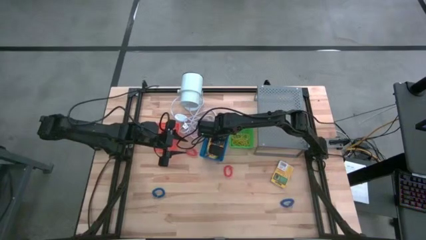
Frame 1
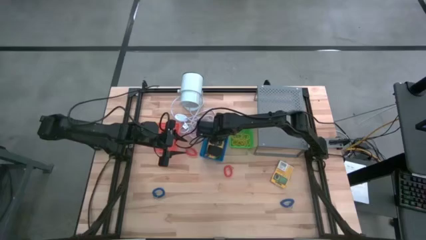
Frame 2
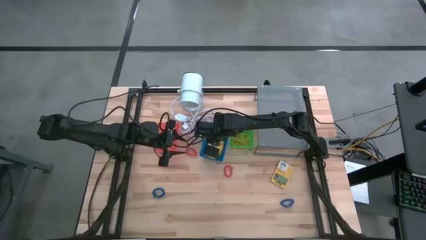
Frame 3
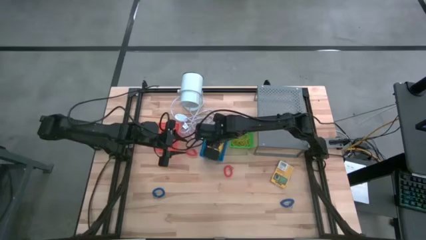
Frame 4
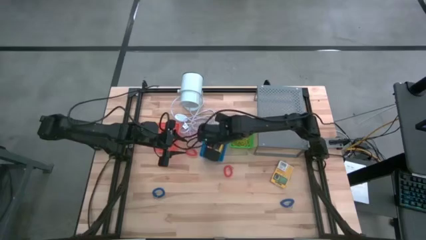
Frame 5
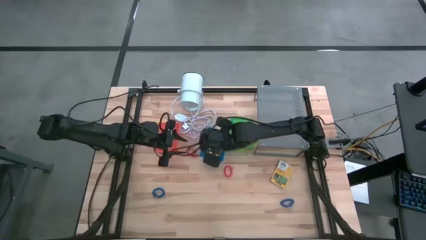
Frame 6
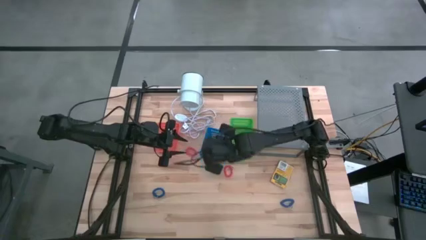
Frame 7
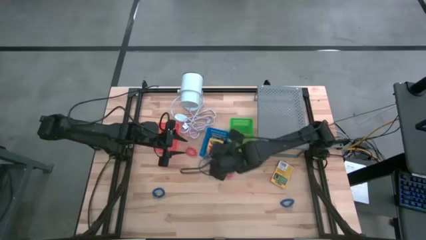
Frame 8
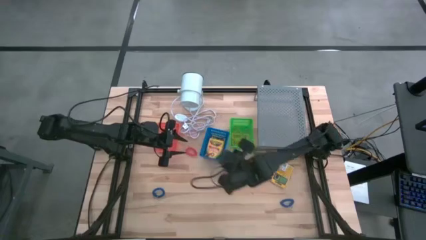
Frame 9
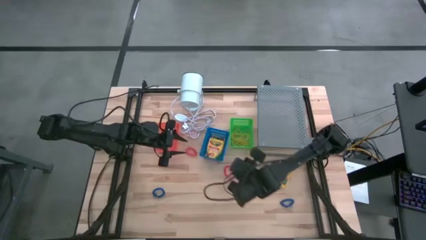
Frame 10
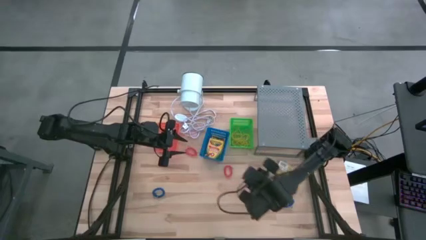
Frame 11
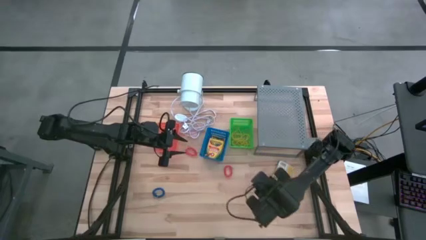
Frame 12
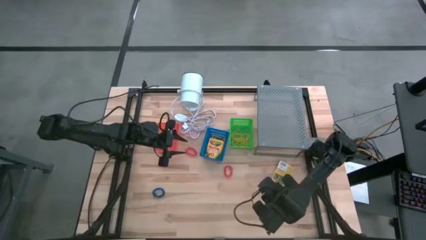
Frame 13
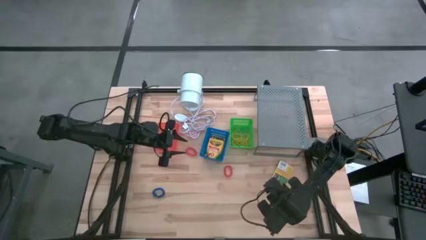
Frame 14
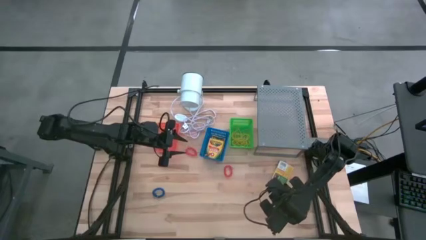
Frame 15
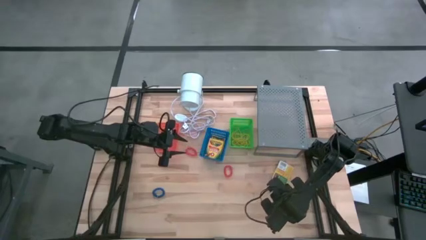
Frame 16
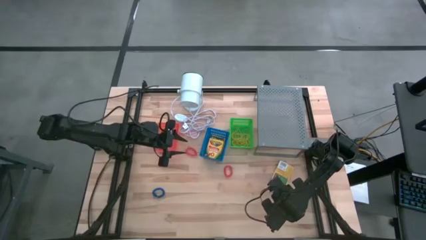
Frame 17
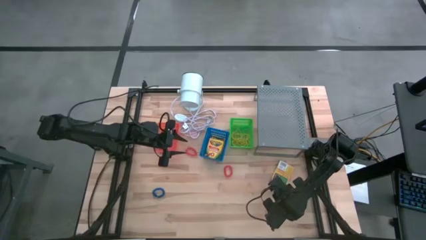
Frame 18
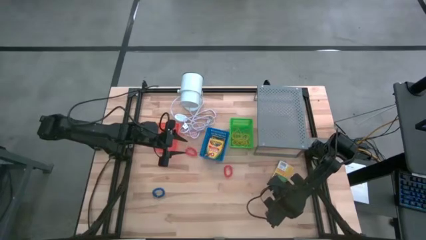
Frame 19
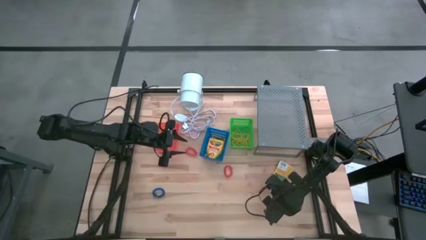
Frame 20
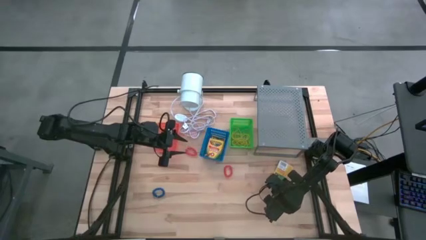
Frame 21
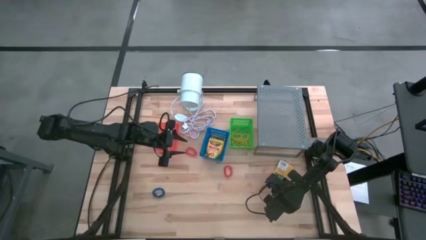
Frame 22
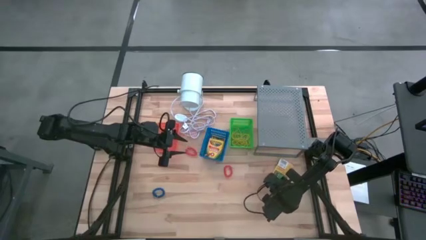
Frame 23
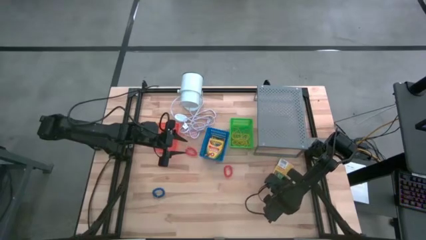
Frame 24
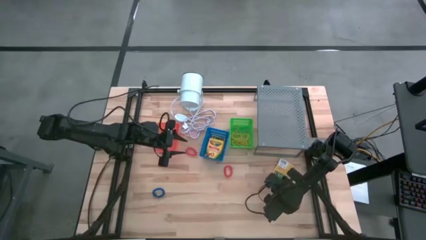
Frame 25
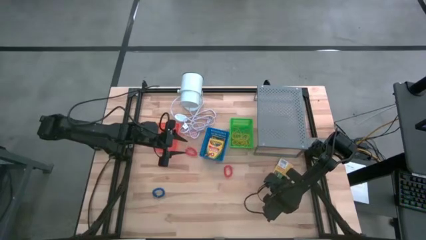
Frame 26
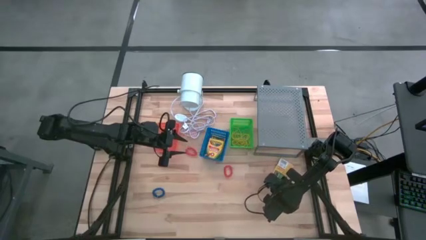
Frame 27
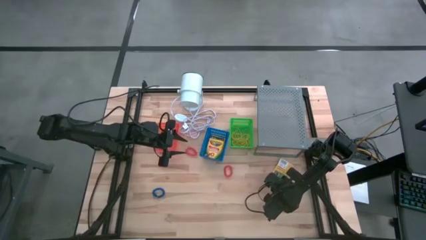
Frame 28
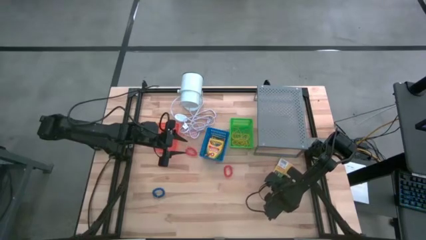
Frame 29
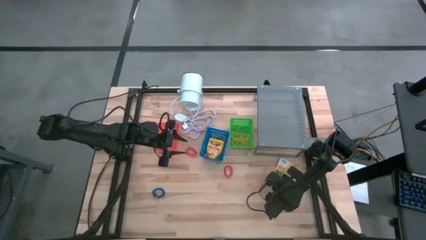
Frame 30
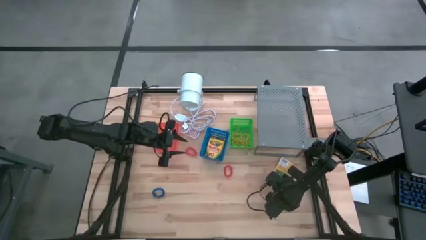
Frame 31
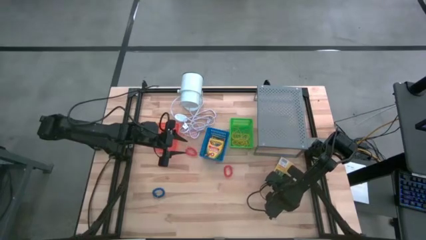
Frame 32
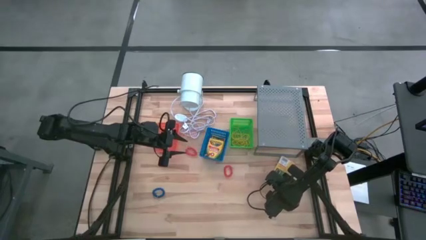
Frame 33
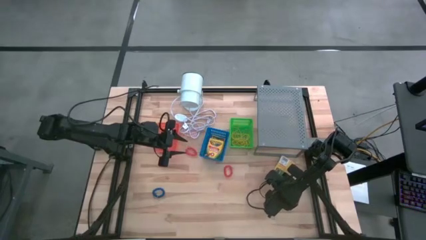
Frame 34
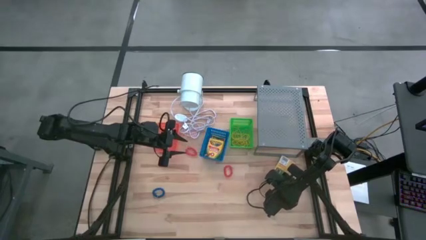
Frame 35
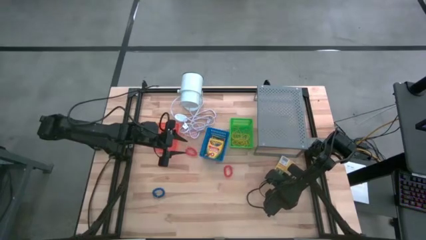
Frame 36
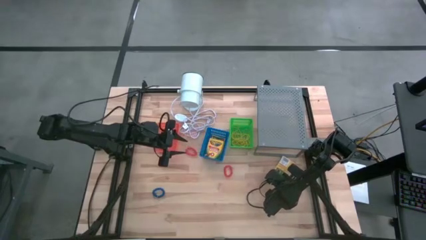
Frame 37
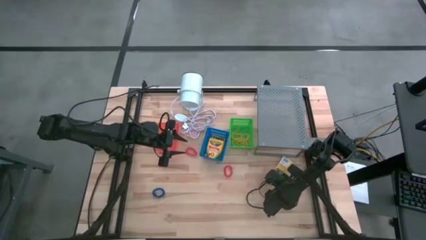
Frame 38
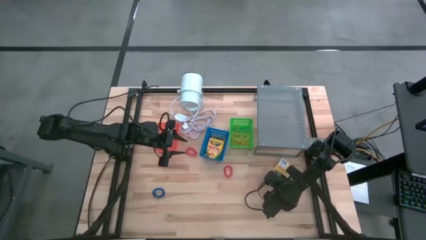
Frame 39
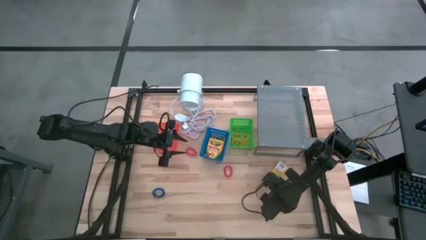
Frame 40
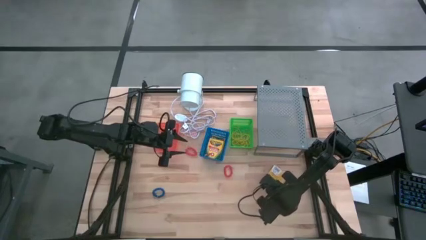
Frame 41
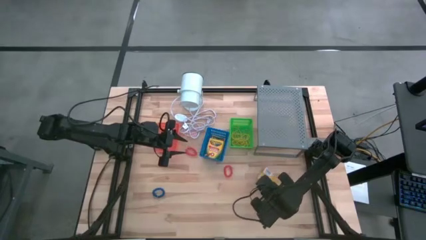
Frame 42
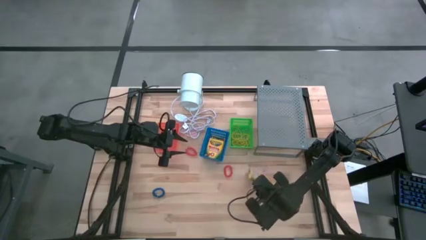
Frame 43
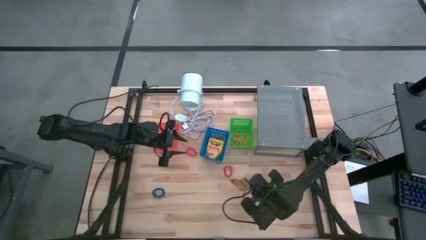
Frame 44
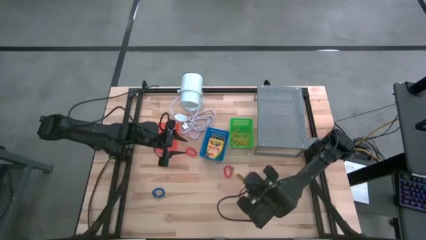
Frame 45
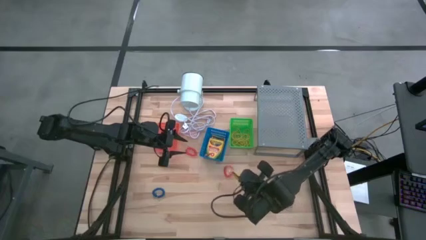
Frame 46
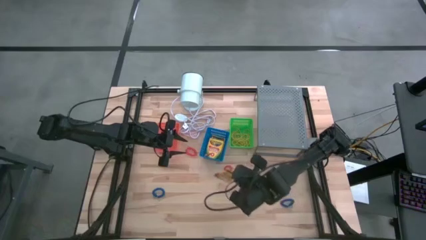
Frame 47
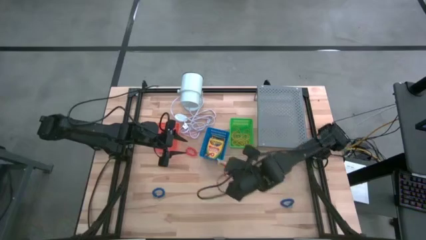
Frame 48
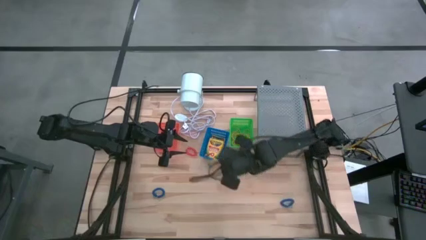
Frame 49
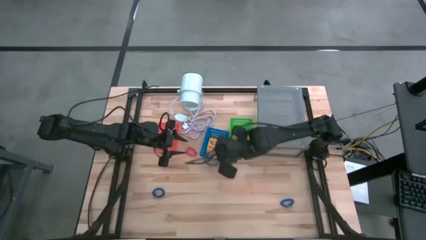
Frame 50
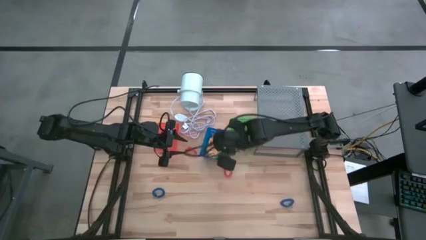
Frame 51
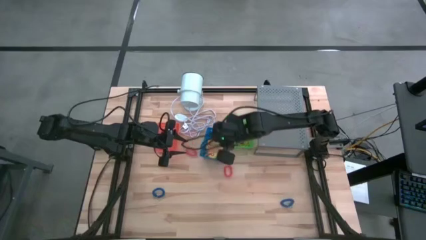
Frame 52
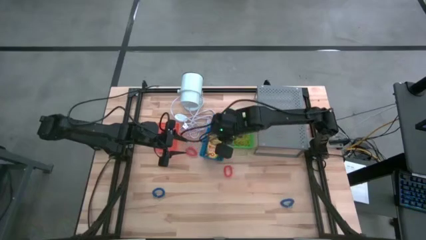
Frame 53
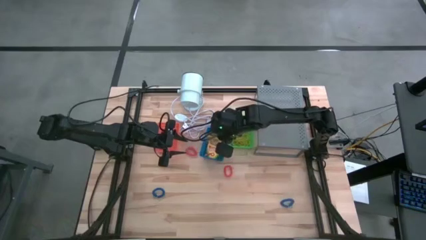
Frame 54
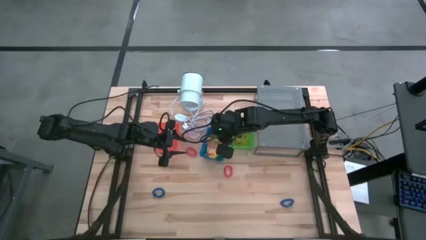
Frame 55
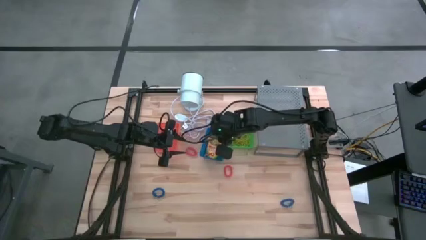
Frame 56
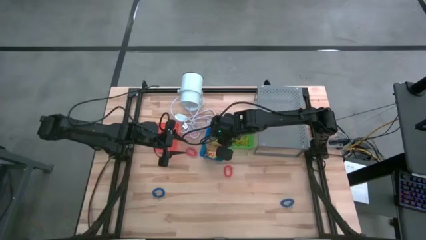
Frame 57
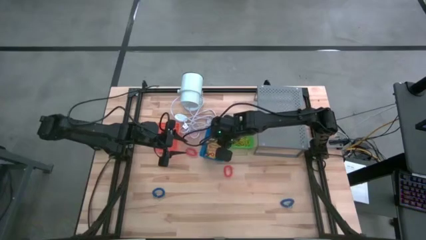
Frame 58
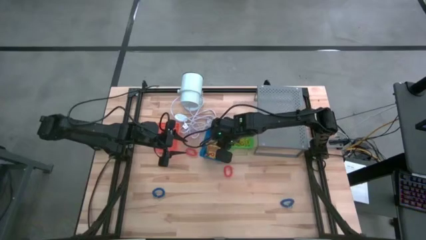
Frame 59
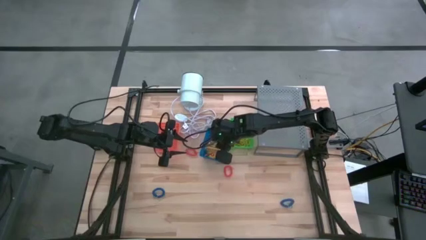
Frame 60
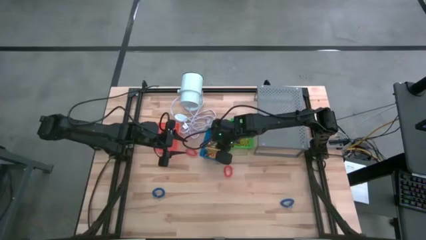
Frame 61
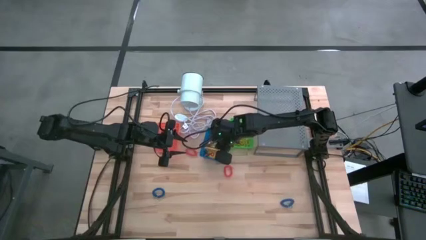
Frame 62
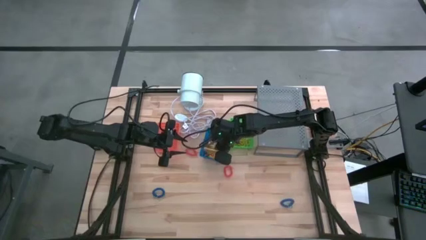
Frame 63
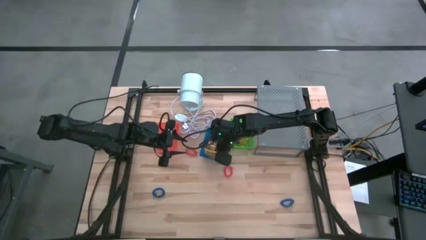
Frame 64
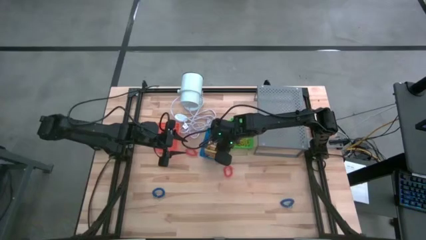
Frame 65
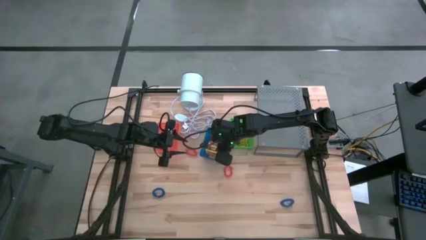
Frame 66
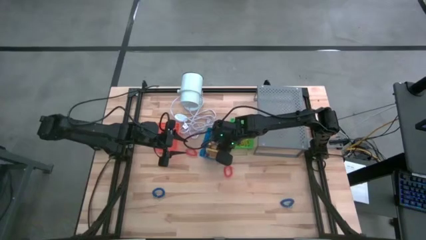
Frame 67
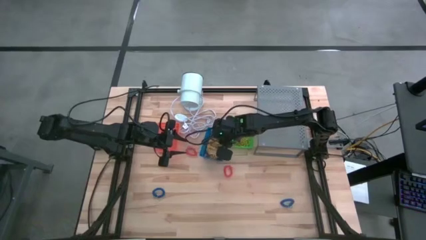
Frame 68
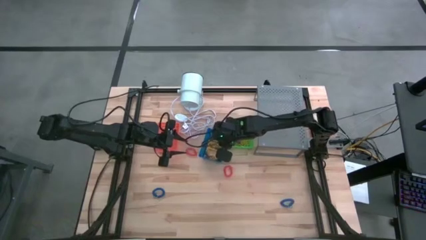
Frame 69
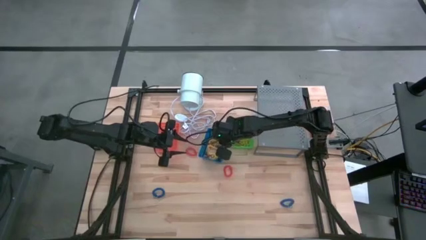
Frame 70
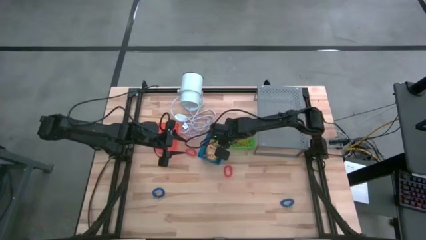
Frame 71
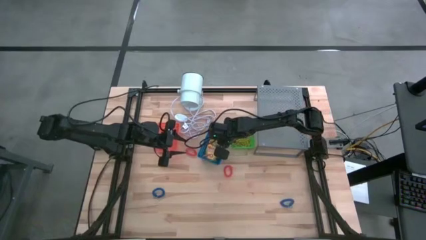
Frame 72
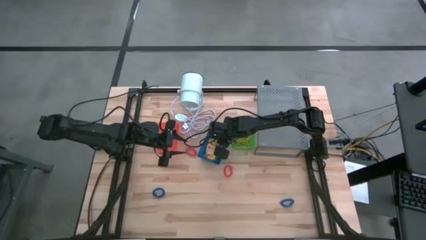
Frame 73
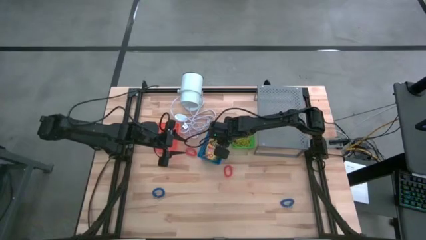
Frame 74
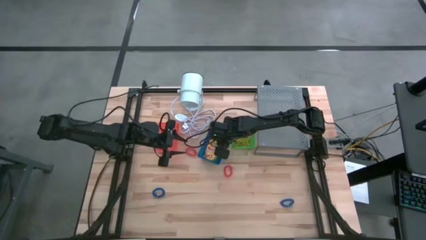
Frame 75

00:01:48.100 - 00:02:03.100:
Task: Pick & Place Office Desk Supplies
Put the pack of crayon into the blue bin
